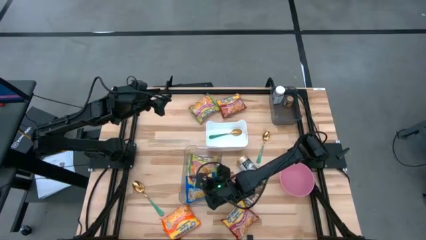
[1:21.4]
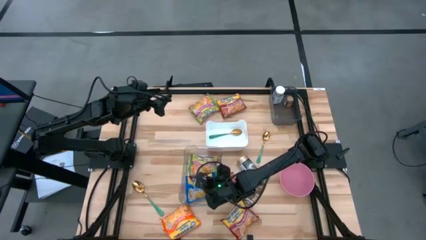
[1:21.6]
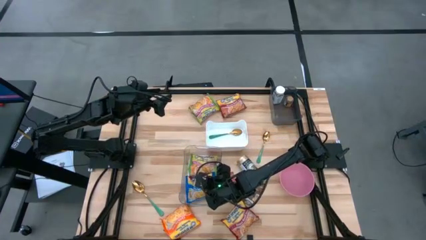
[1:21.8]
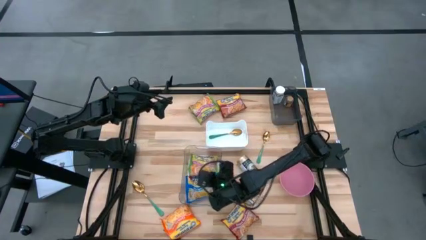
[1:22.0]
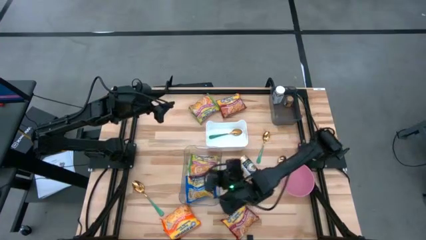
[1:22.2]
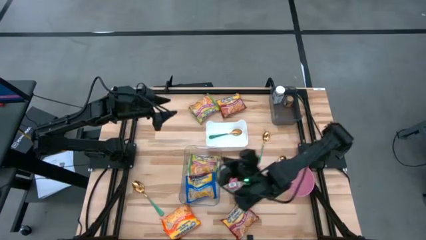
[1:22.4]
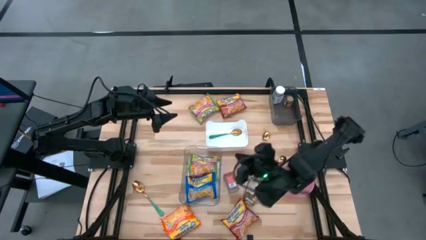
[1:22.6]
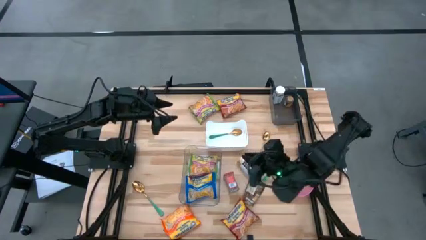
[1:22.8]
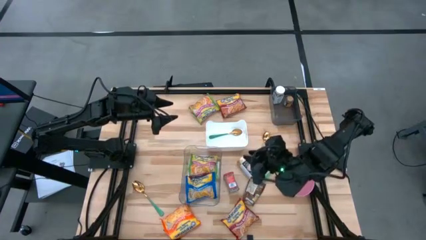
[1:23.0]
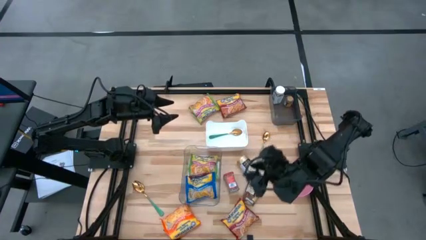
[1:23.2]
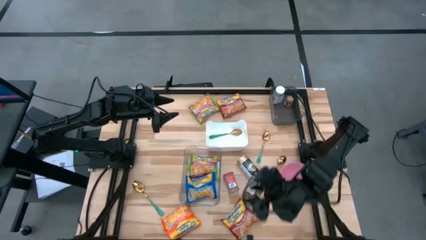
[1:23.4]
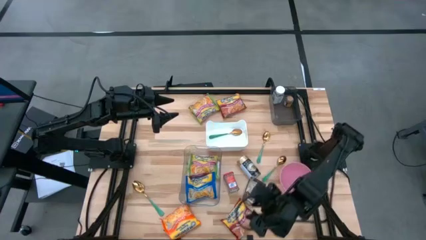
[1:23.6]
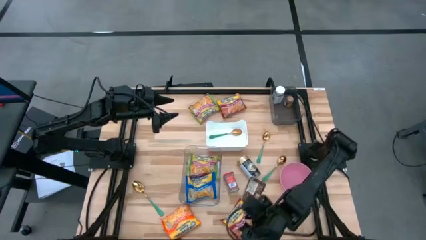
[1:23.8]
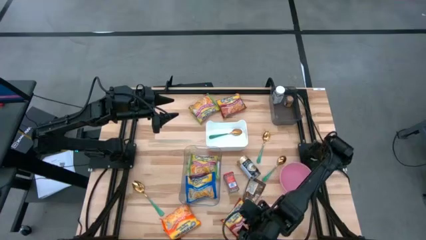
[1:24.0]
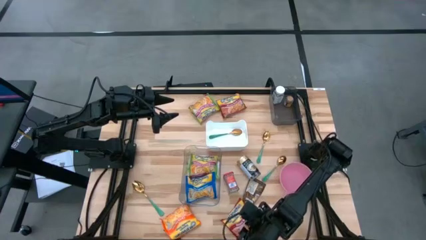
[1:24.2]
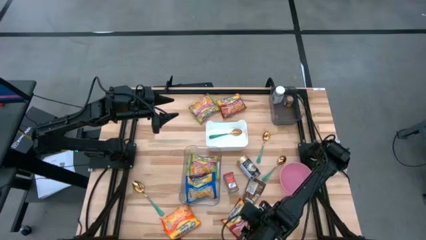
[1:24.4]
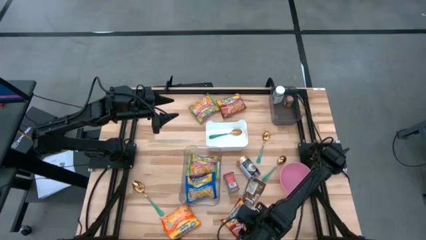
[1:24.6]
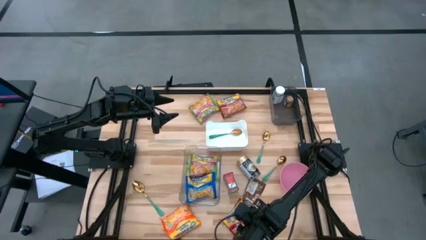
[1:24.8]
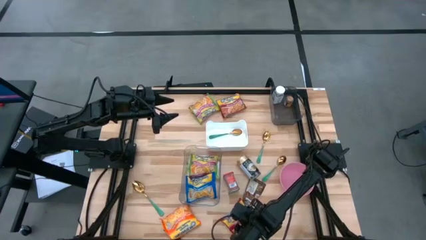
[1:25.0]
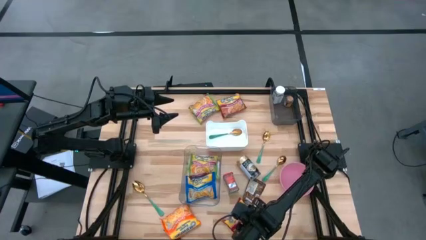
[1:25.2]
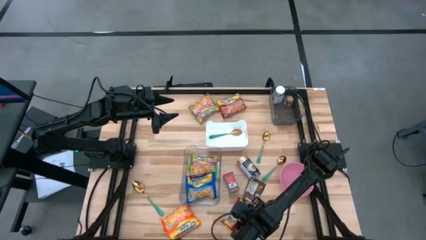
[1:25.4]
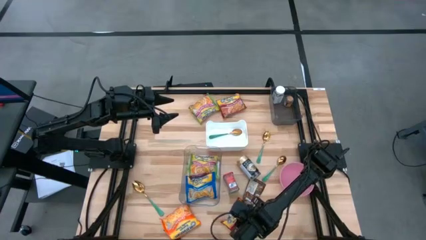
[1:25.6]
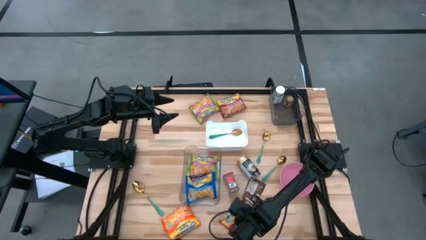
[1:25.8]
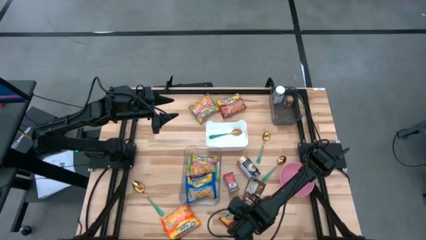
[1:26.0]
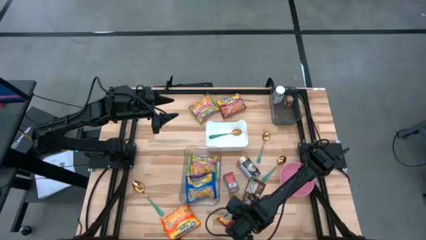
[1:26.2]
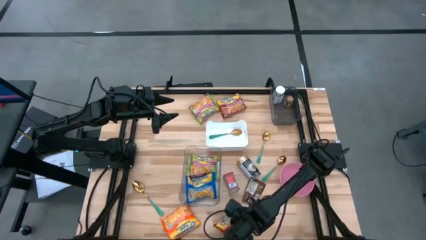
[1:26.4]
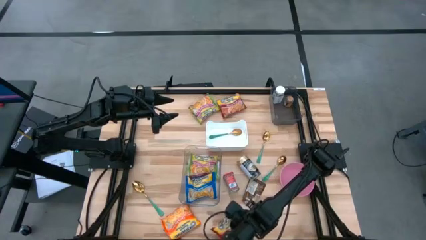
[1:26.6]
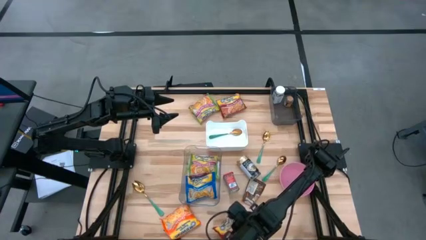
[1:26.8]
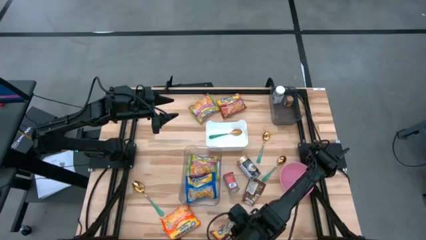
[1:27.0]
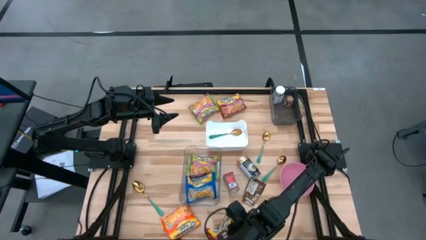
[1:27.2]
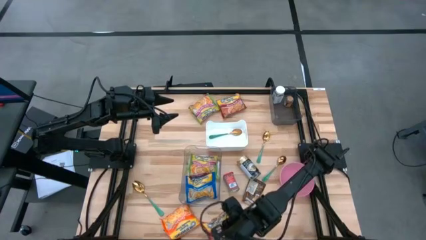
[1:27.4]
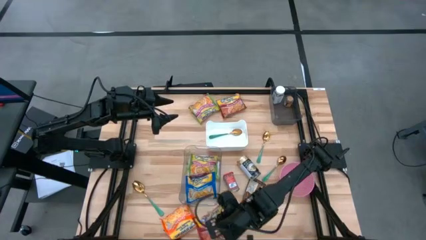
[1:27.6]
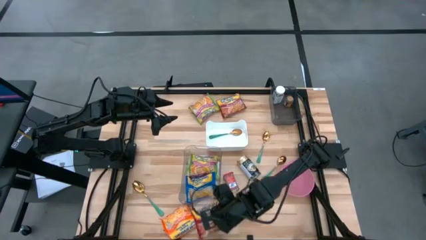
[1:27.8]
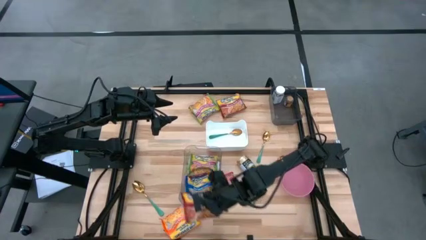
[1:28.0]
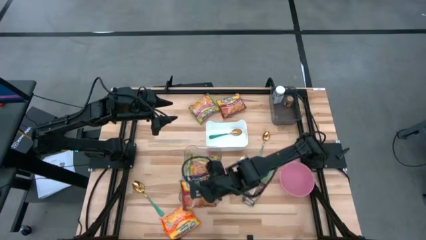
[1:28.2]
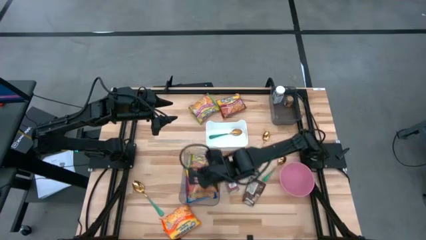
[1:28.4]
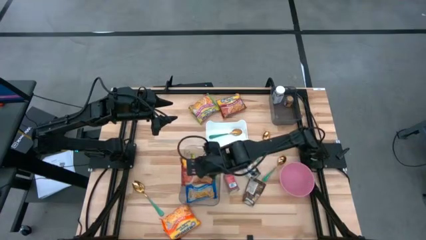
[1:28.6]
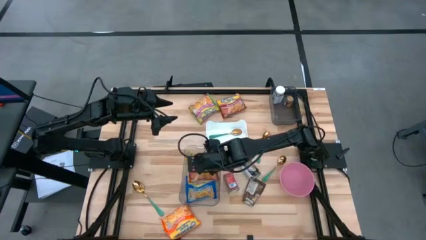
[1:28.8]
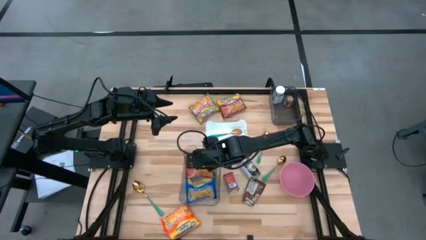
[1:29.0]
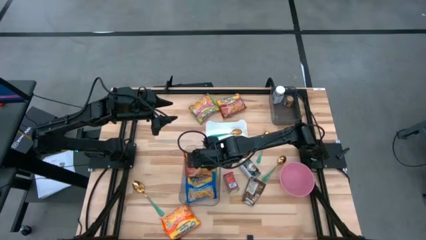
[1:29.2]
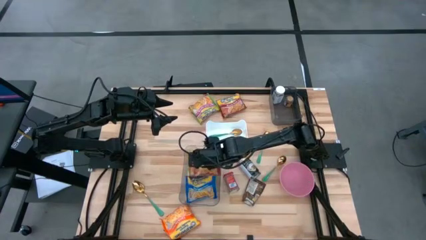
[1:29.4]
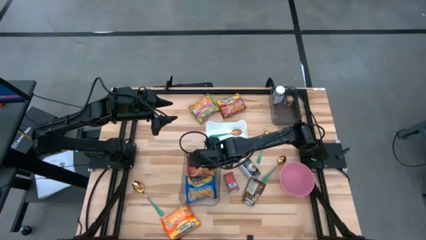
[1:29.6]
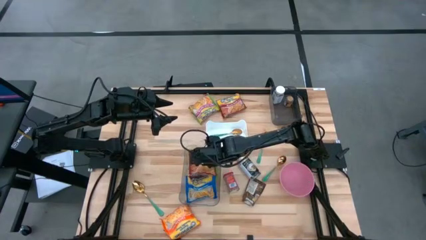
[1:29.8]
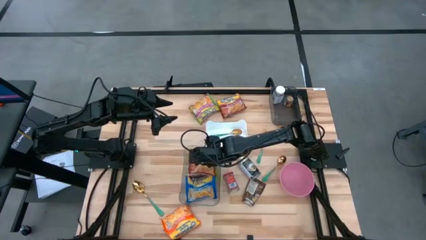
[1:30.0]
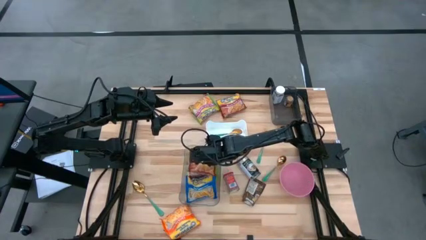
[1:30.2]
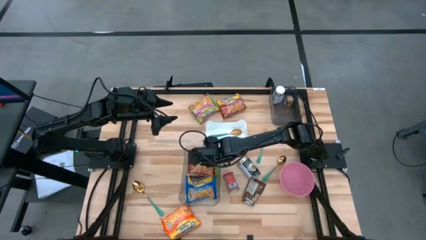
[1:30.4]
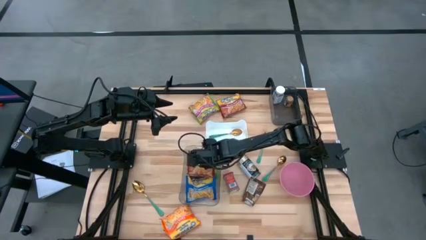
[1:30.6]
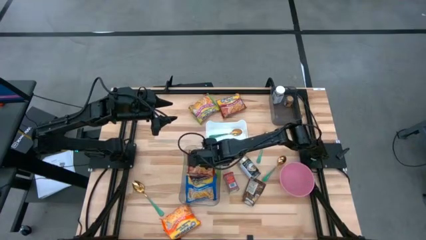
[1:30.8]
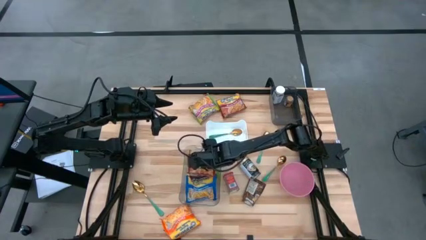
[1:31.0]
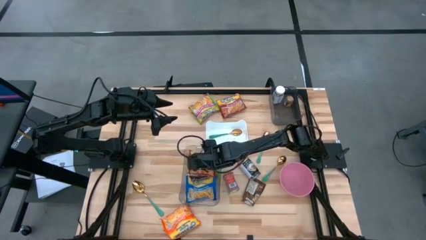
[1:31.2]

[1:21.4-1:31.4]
Task: Pick & Place Food Item
Put the red noodle pack into the transparent bin
